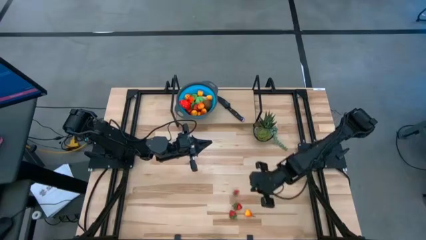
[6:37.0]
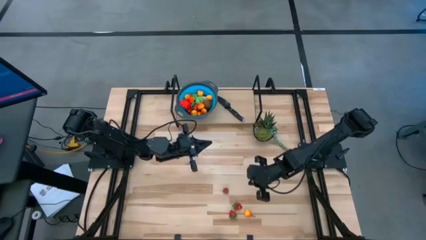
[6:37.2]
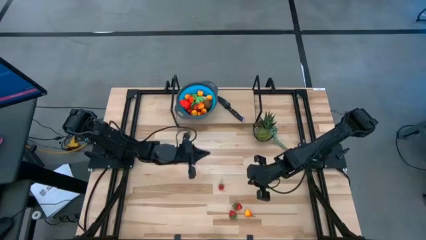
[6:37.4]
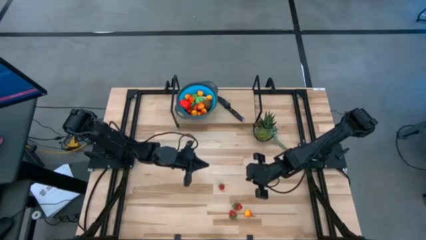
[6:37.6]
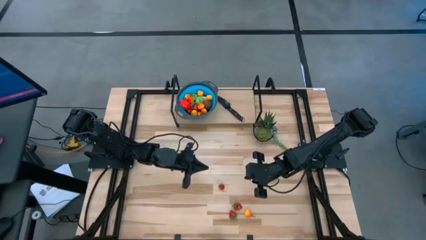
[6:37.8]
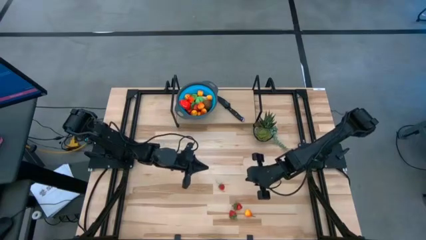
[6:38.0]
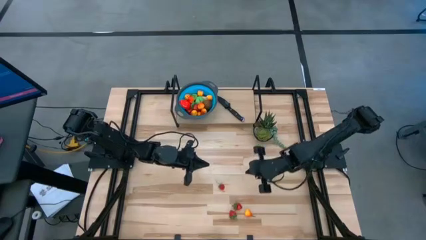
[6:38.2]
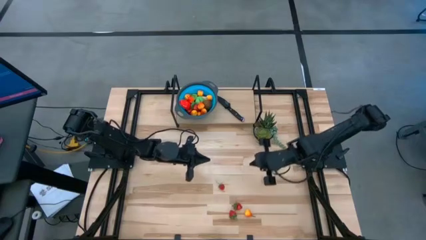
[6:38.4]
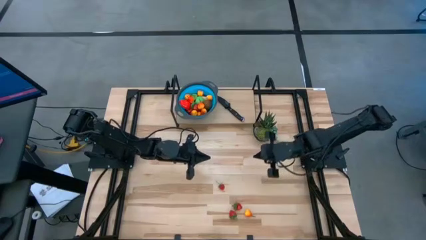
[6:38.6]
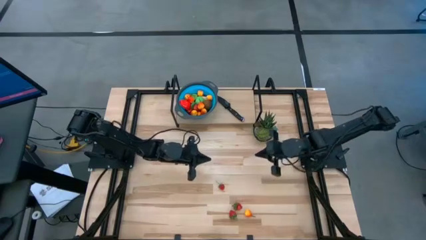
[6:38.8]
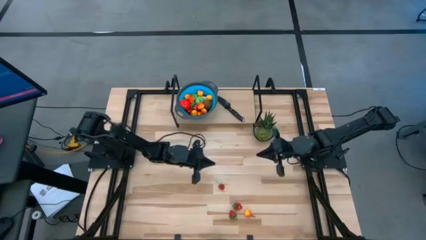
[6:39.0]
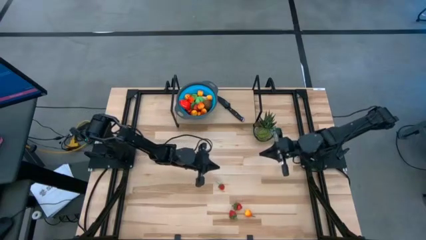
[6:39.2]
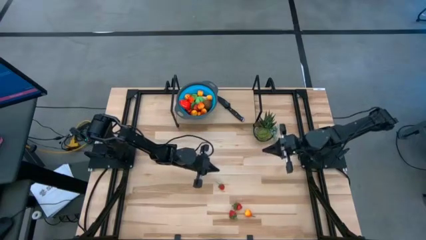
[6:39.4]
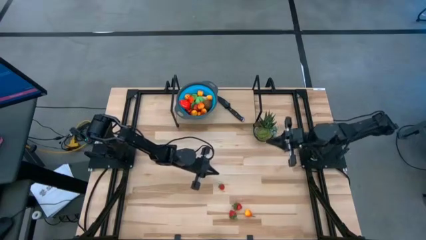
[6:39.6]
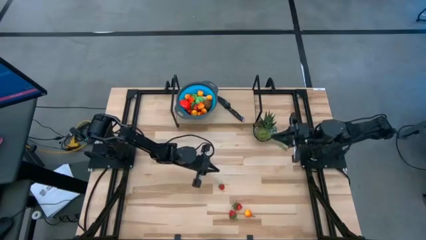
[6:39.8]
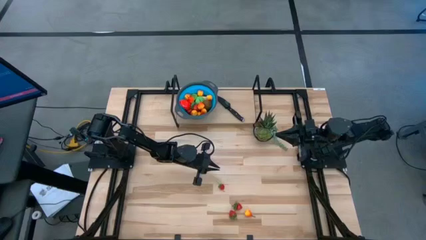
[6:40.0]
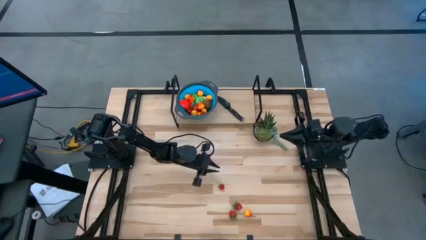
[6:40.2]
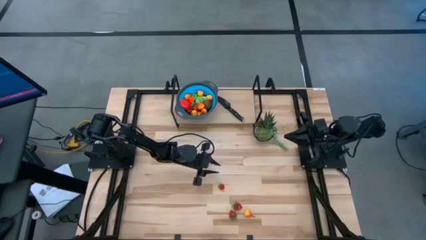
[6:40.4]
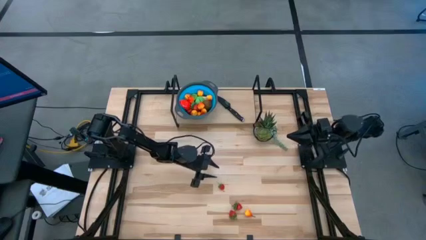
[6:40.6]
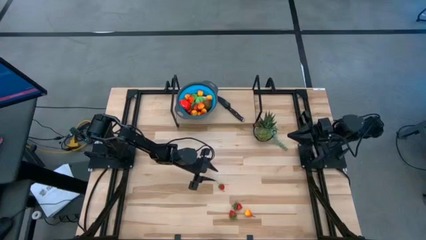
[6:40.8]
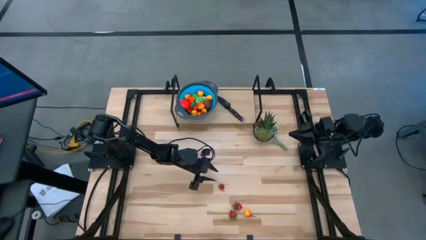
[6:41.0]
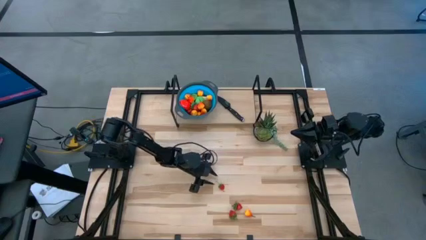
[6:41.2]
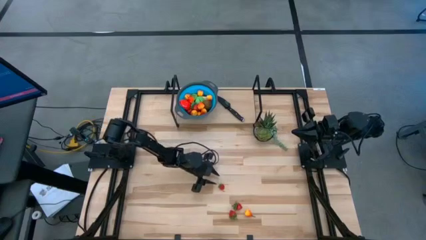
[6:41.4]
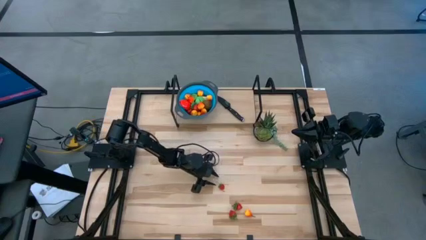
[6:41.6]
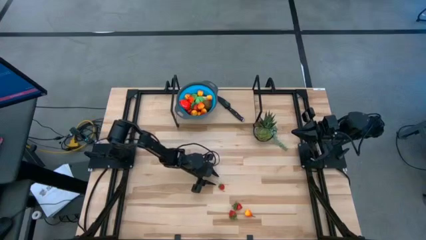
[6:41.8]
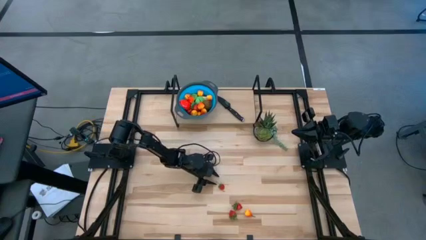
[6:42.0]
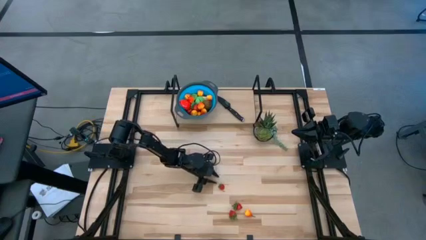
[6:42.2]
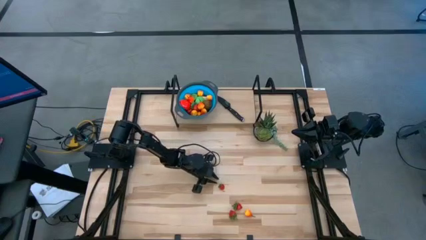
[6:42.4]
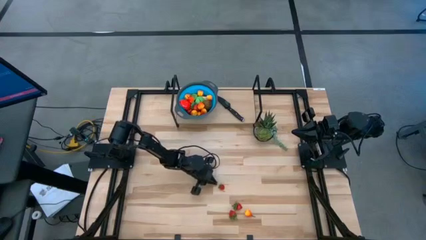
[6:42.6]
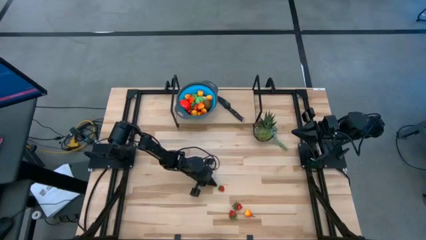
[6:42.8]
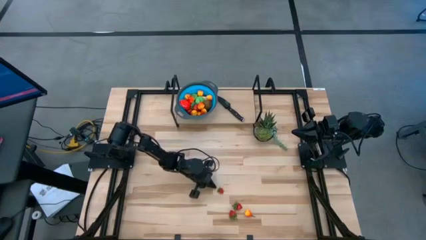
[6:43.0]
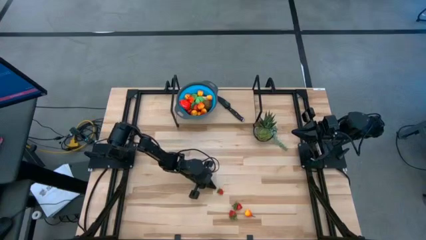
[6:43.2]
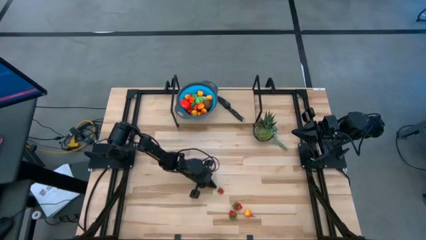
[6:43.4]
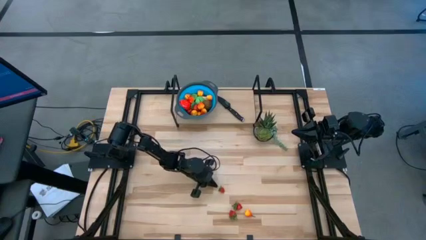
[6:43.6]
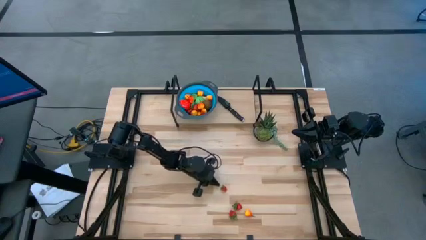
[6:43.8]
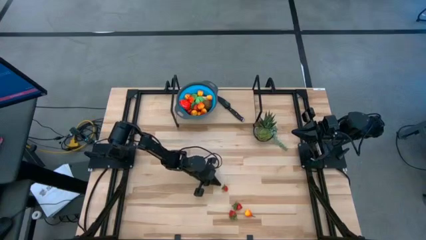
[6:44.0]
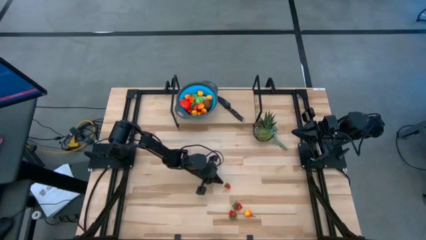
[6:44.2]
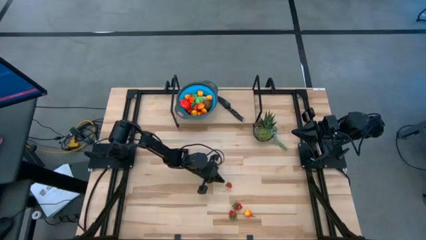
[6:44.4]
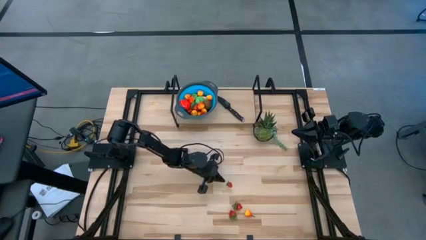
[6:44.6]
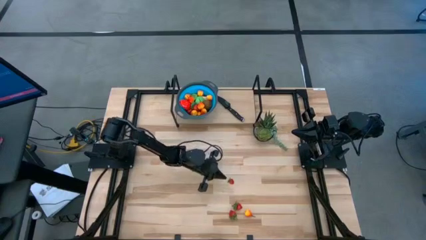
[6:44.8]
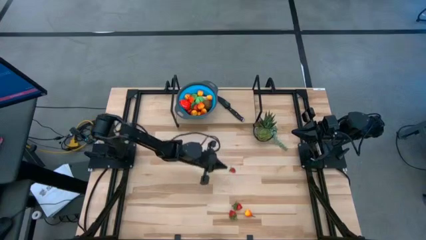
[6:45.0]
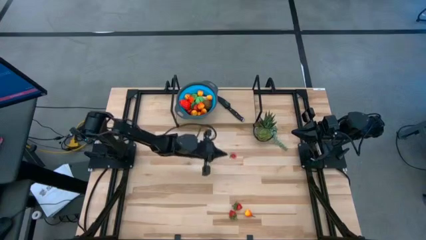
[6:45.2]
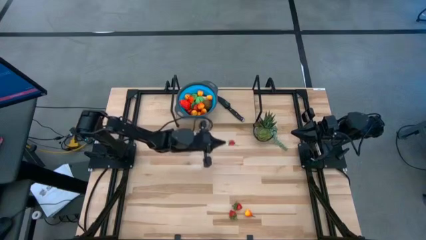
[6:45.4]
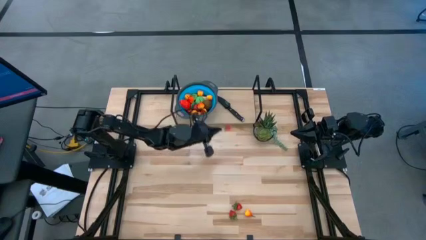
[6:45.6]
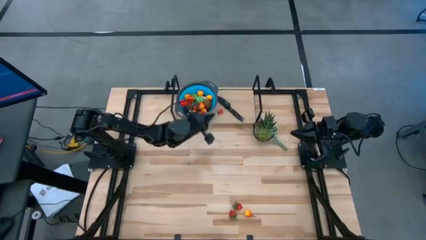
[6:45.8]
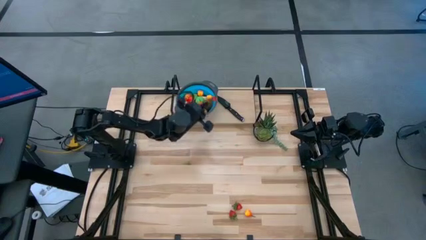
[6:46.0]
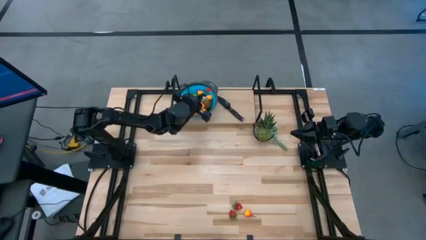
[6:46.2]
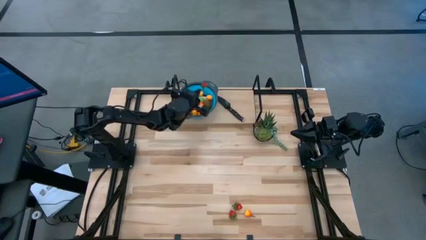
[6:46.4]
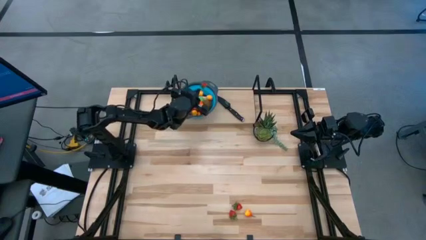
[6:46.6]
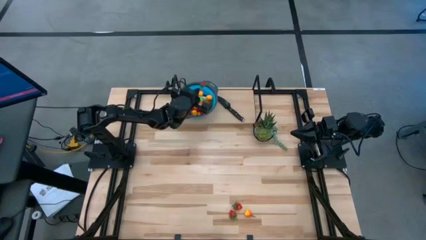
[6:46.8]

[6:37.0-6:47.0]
Task: Pick & Place Fruit
Put the strawberry into the basket

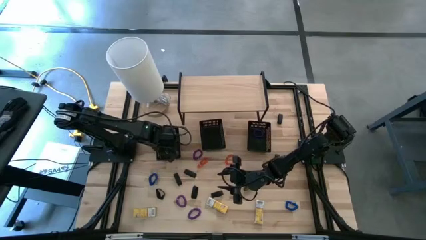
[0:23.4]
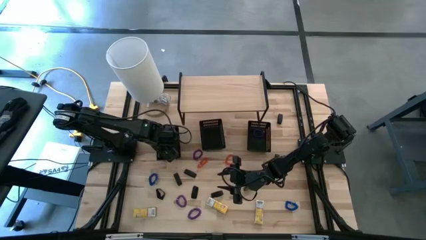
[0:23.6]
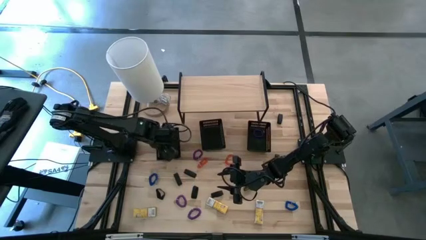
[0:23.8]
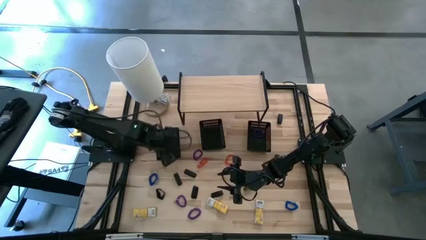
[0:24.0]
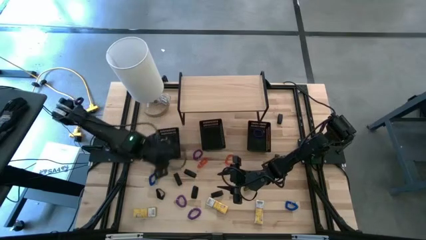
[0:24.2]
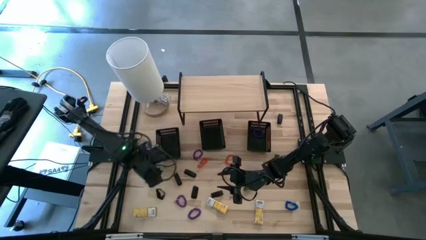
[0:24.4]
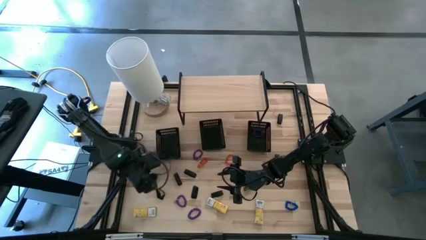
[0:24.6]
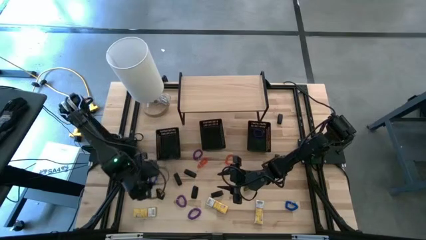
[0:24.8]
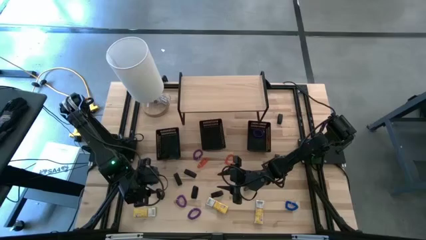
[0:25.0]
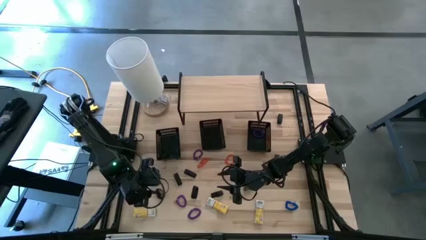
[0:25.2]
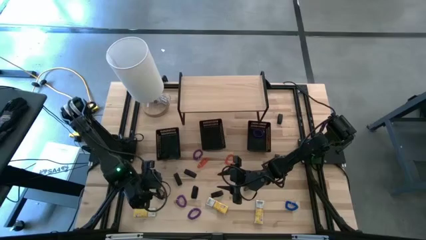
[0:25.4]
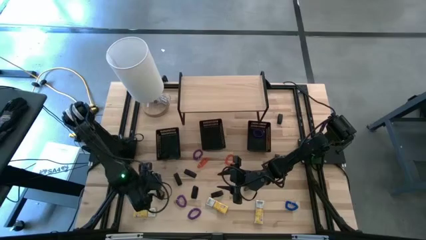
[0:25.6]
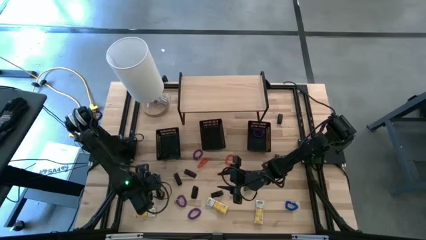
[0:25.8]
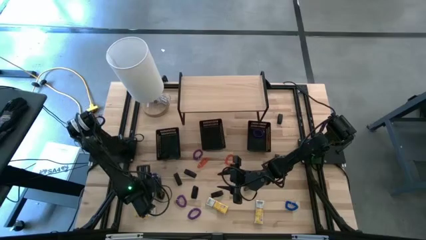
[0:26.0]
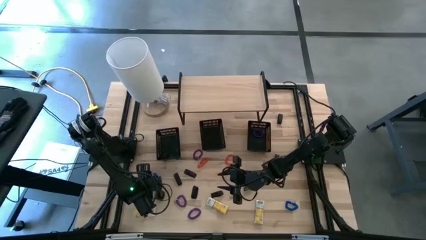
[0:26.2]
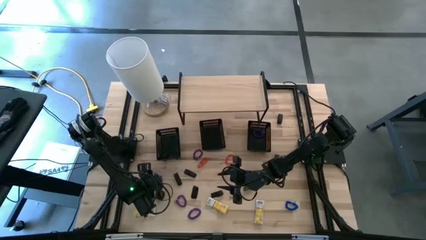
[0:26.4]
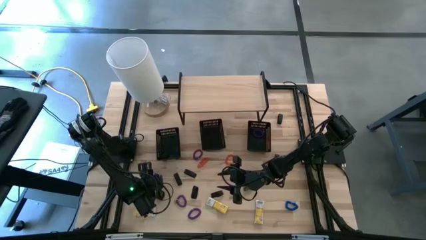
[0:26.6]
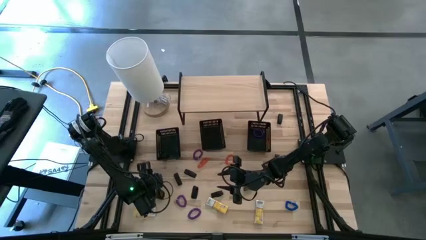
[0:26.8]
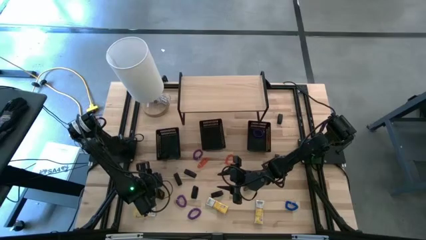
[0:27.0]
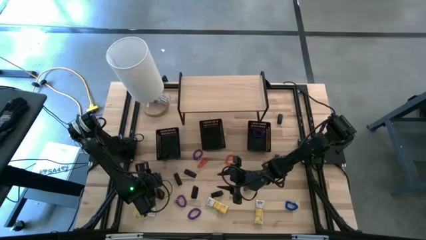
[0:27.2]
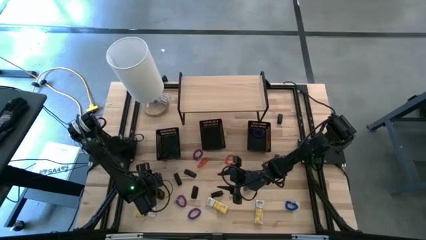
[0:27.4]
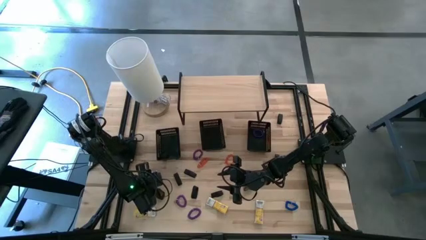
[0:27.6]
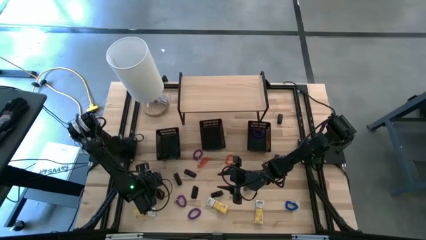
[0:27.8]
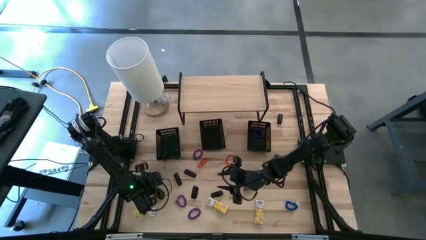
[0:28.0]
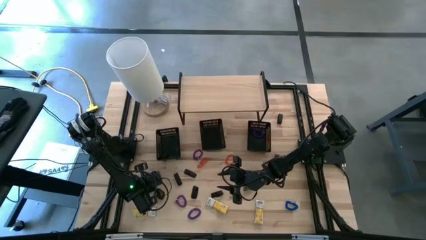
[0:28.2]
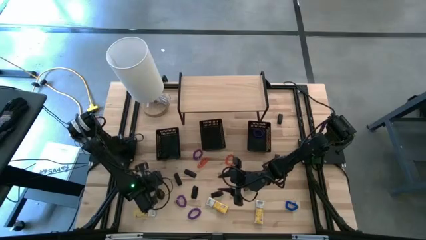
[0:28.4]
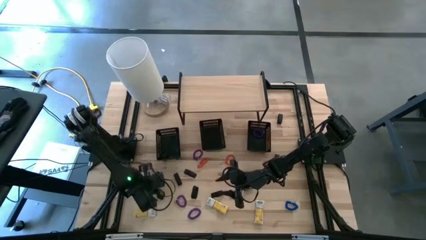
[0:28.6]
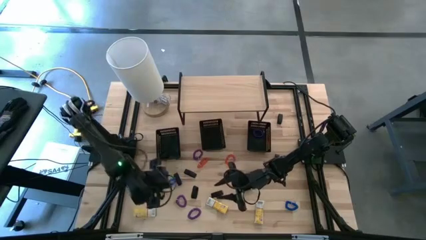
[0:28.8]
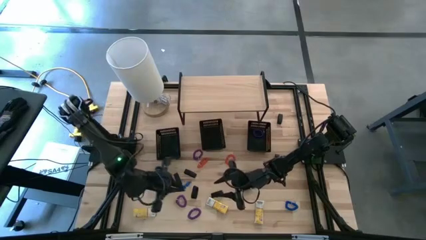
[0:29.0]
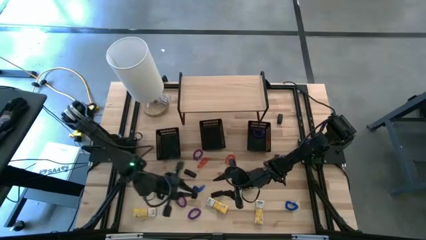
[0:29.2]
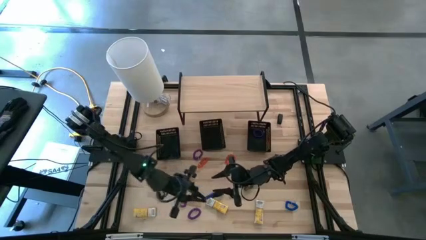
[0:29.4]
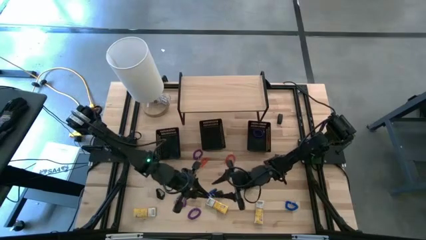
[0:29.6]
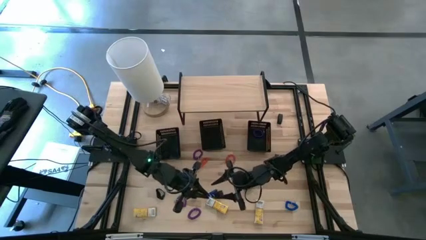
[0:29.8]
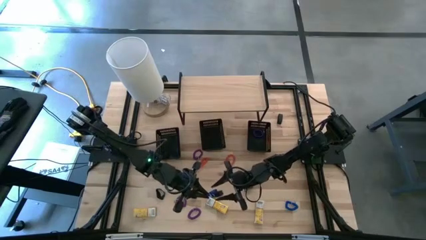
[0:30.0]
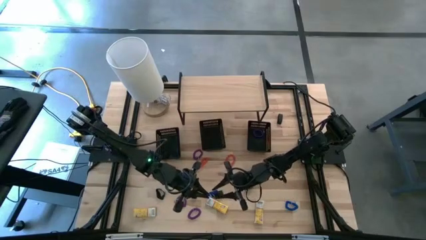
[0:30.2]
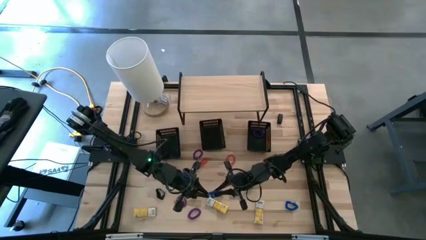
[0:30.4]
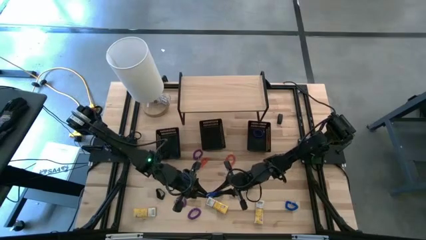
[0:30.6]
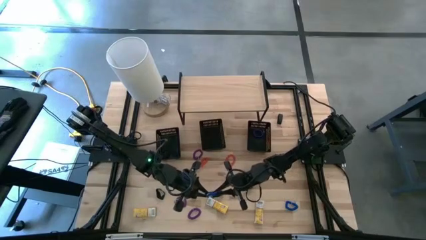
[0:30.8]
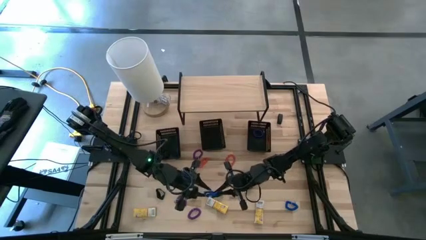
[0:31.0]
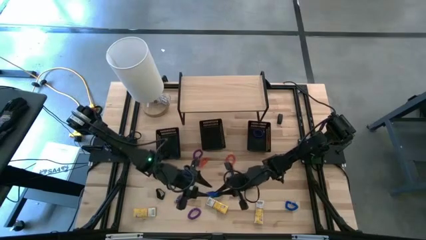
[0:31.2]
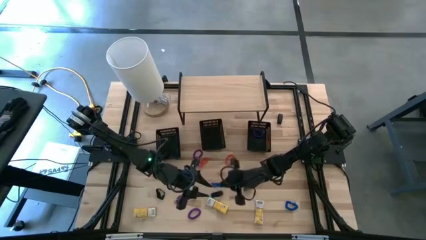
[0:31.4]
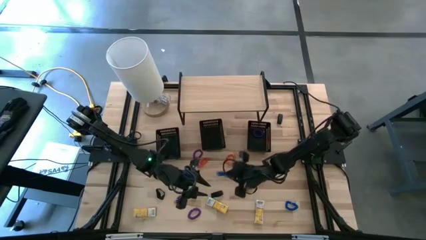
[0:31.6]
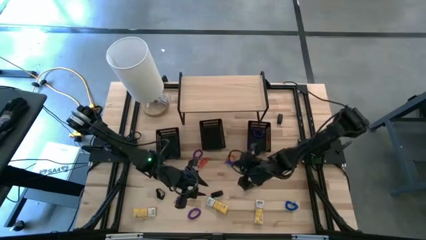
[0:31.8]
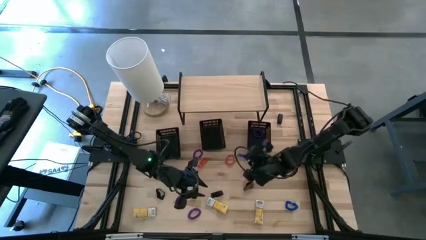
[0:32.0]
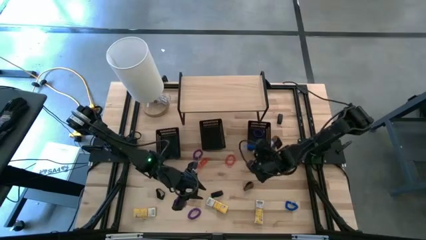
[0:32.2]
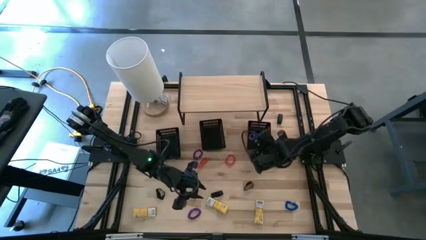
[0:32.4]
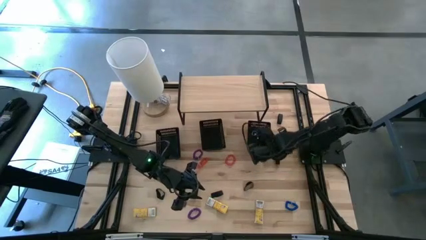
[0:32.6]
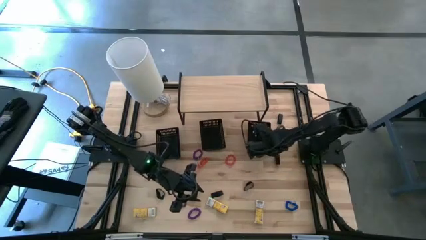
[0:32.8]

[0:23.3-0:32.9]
Task: Pick & Place Office Desk Supplies
Put the blue spring keychain into the right black bin
